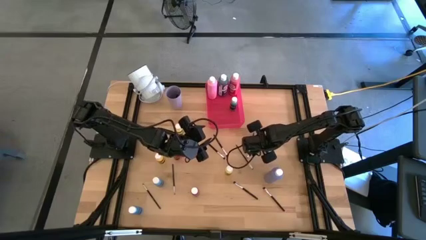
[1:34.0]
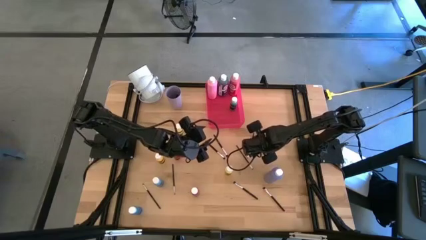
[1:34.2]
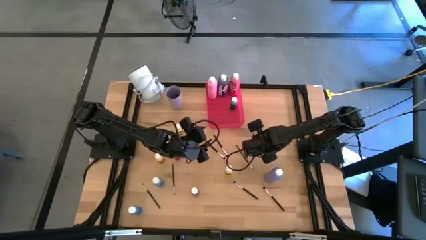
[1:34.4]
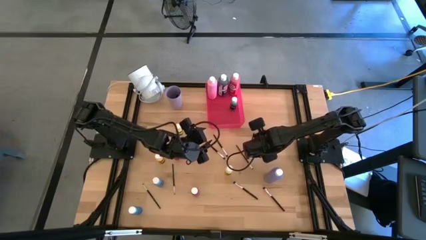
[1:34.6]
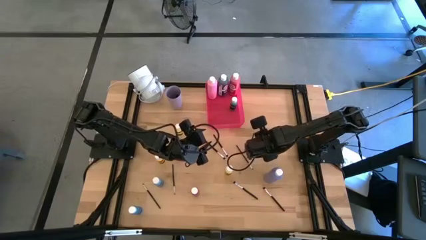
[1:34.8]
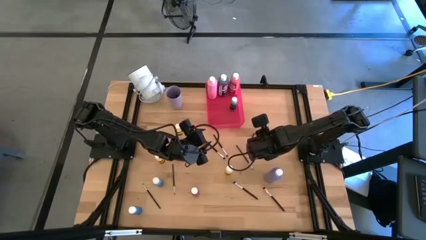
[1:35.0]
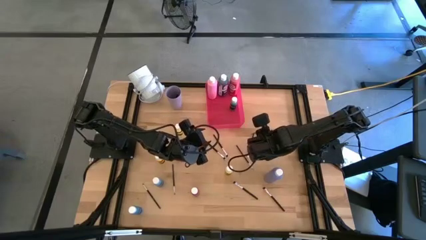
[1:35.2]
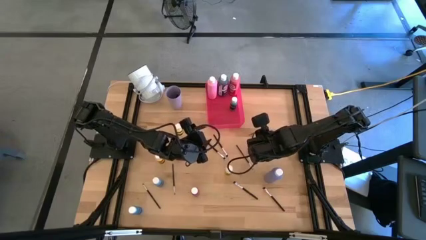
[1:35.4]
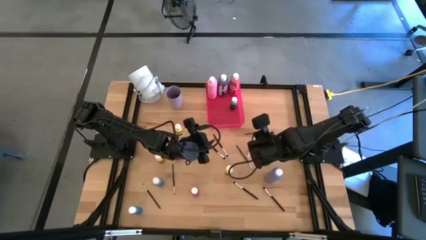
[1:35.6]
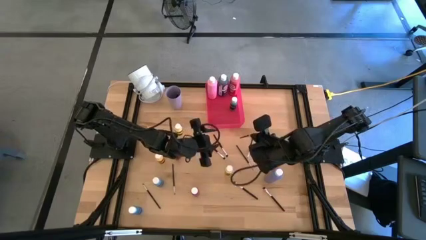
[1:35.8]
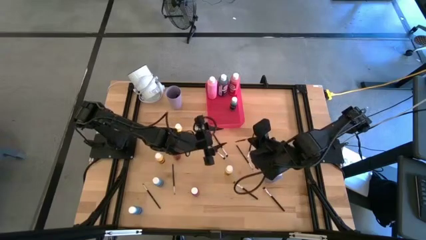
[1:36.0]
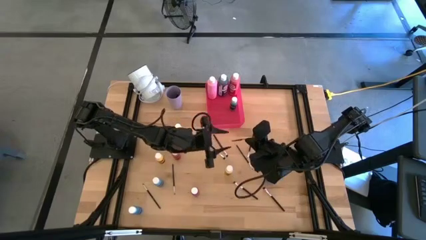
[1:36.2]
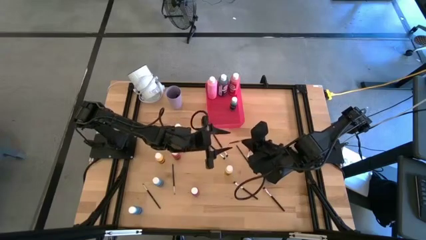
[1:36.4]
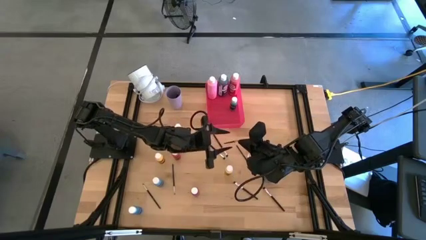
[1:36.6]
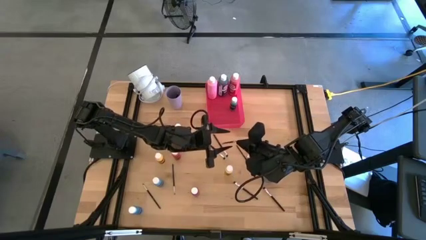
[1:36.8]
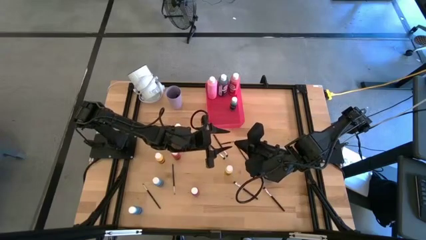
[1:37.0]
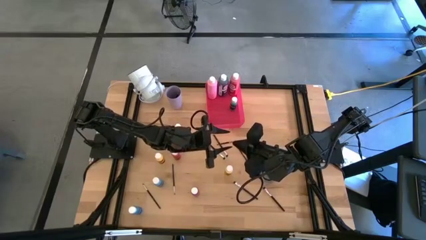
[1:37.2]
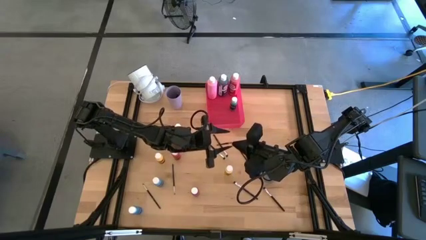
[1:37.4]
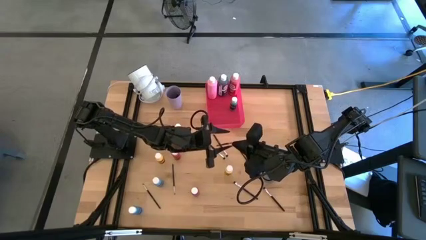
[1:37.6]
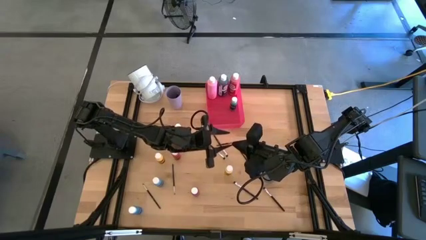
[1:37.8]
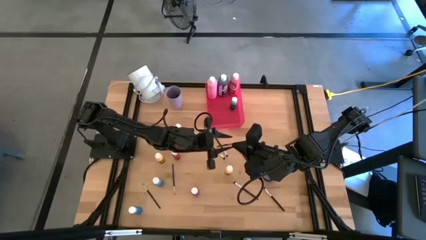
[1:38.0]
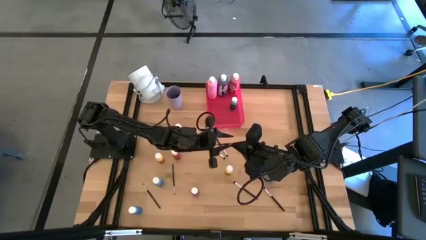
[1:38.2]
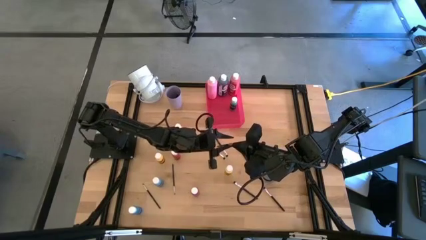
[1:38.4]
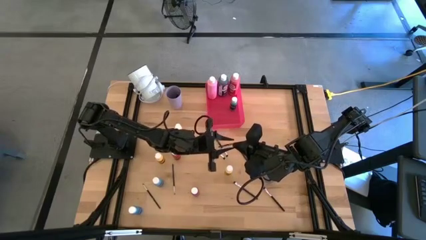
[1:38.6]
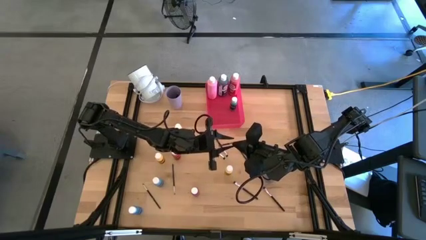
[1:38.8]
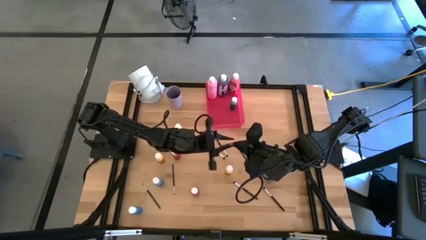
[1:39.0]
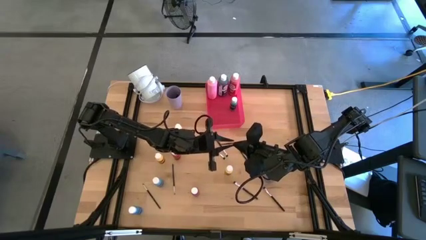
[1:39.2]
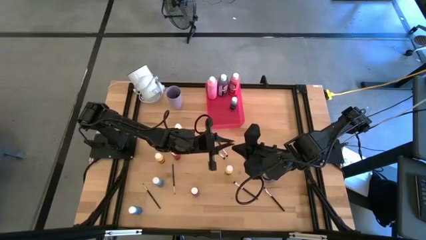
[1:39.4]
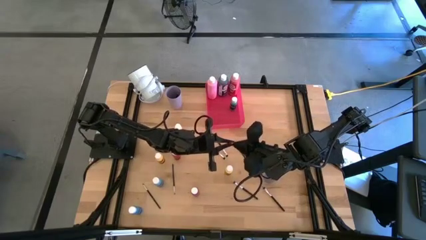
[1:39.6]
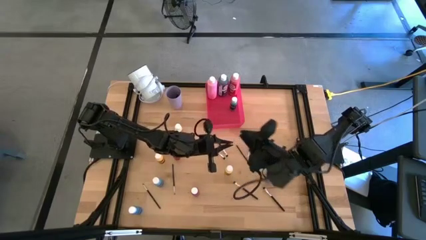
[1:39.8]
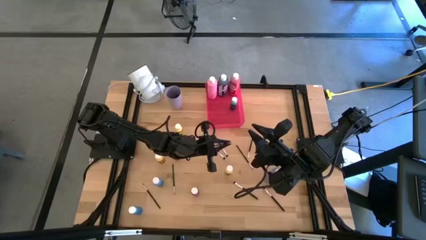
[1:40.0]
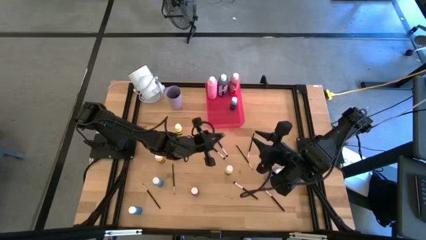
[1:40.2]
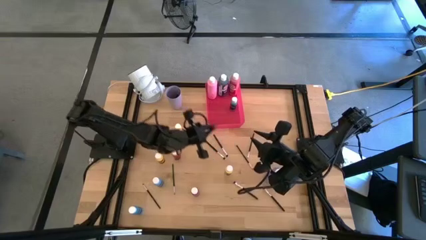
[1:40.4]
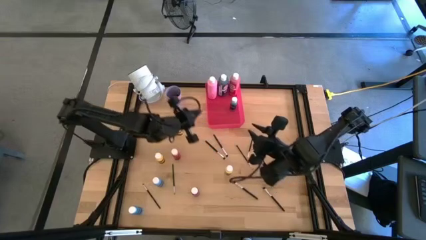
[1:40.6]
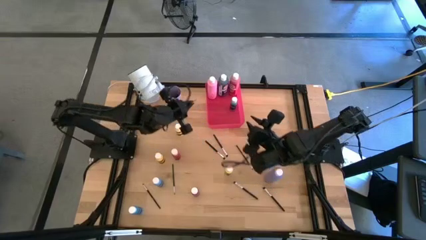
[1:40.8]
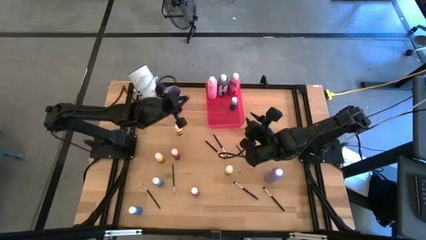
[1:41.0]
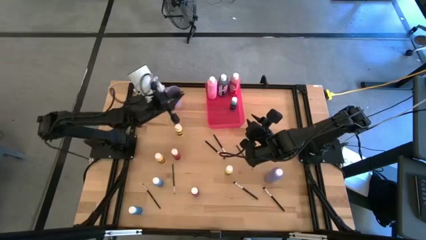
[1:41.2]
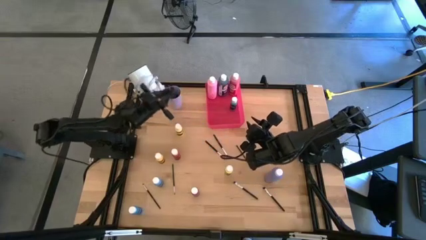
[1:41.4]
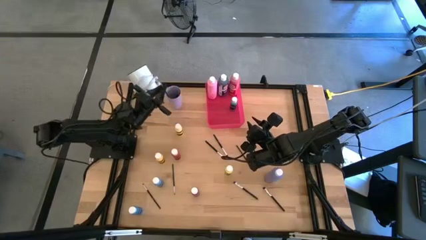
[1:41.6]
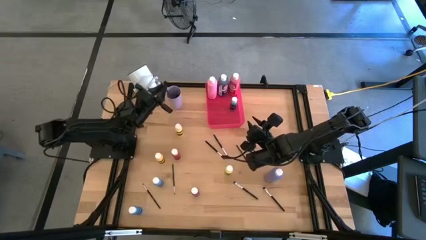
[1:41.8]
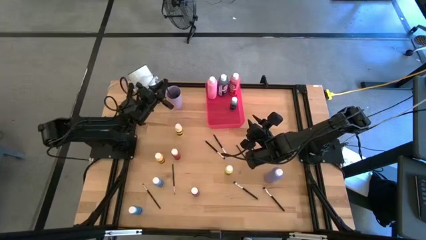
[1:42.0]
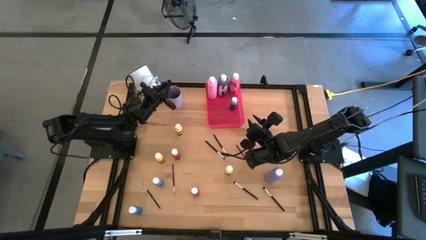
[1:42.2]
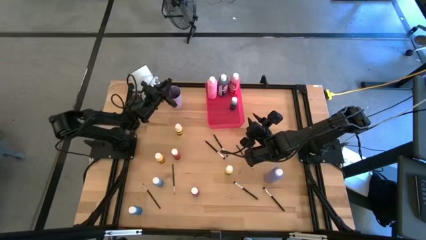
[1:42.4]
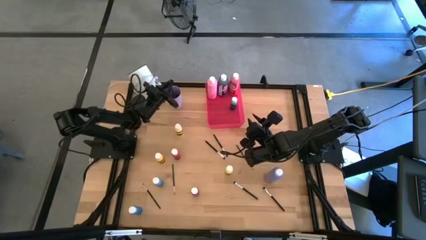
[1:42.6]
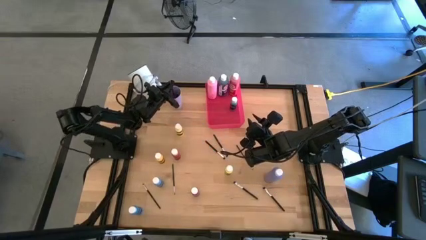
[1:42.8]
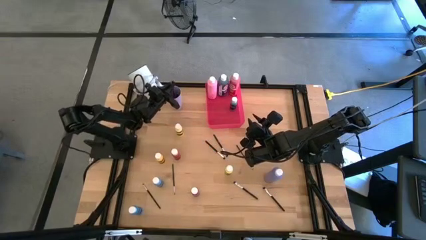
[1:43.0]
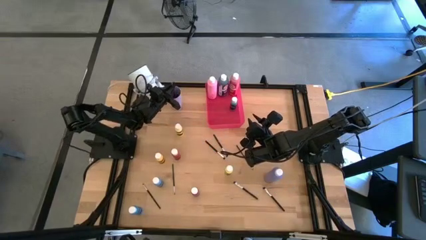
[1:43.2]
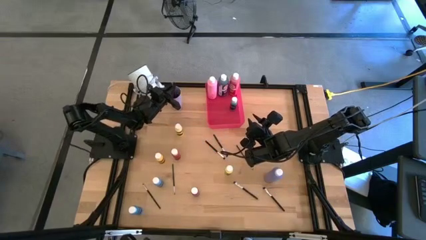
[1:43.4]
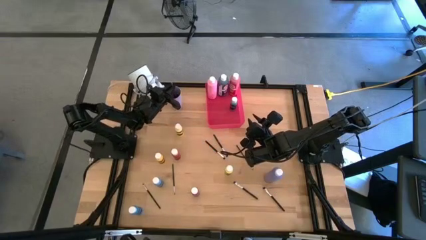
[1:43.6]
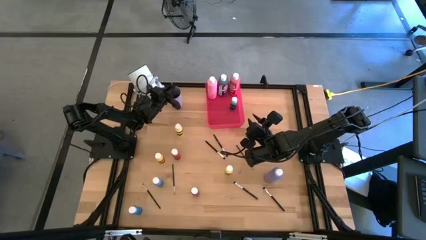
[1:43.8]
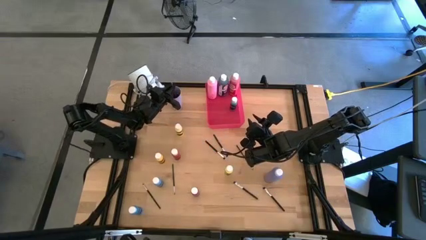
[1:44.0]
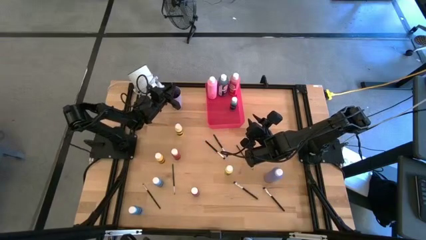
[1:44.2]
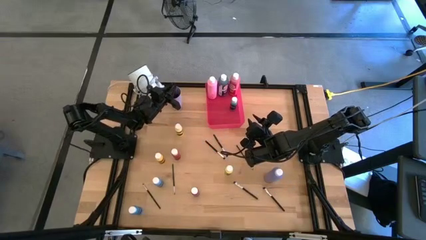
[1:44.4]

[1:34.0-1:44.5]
Task: Pick & Place Paint Supplies
Put the black paint brush into the purple cup

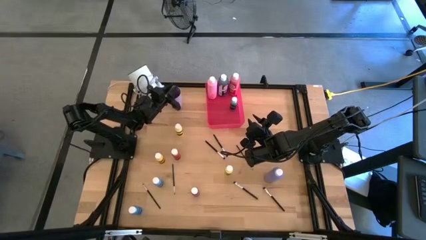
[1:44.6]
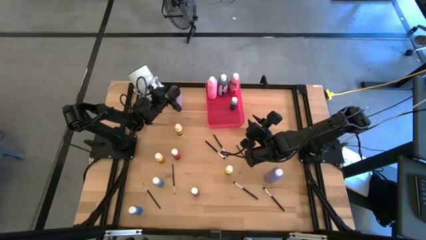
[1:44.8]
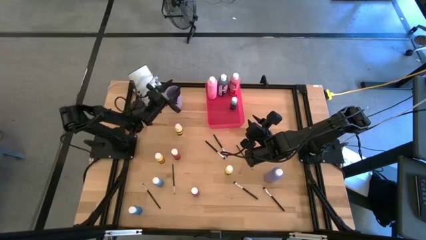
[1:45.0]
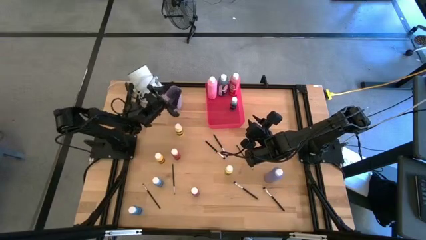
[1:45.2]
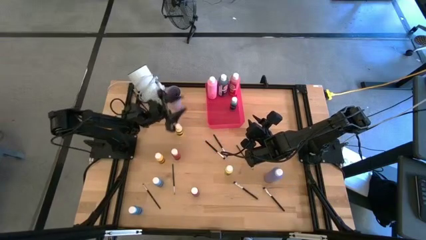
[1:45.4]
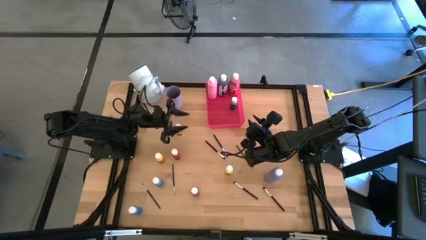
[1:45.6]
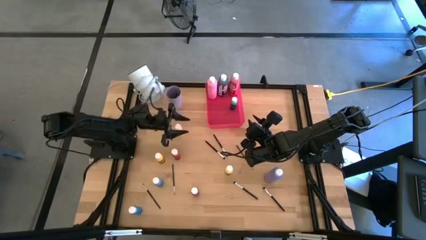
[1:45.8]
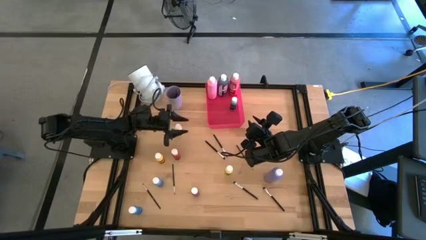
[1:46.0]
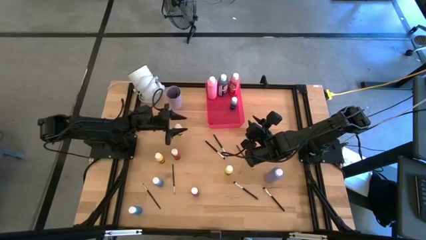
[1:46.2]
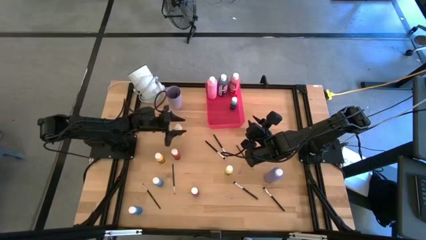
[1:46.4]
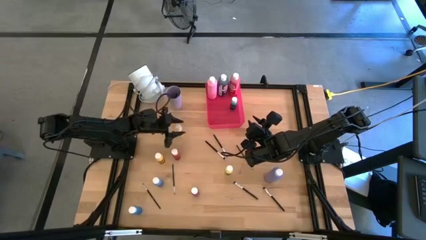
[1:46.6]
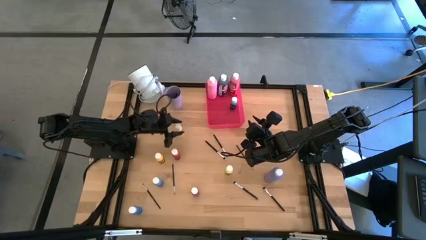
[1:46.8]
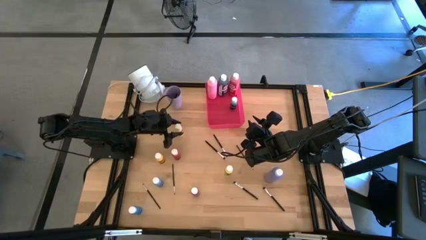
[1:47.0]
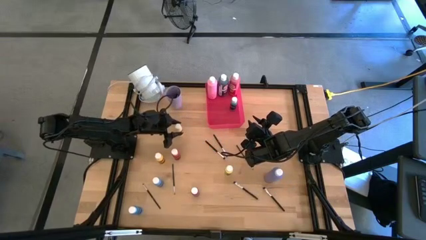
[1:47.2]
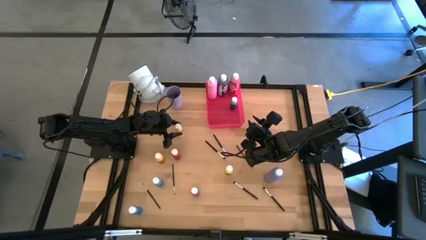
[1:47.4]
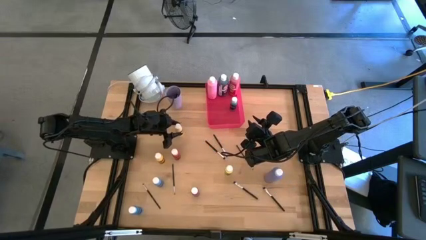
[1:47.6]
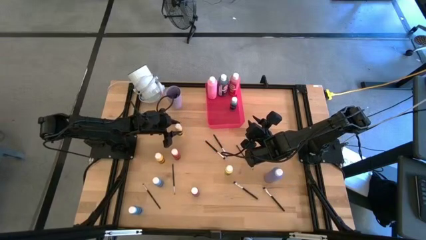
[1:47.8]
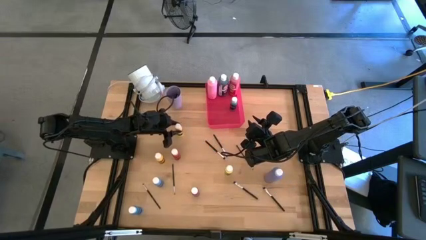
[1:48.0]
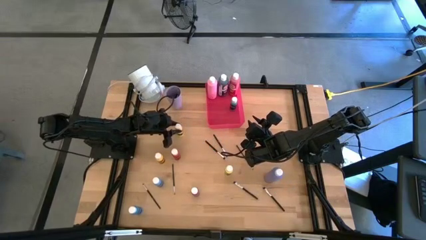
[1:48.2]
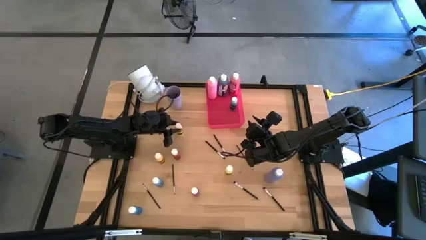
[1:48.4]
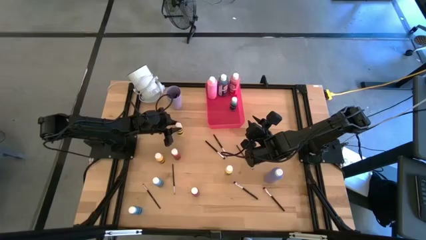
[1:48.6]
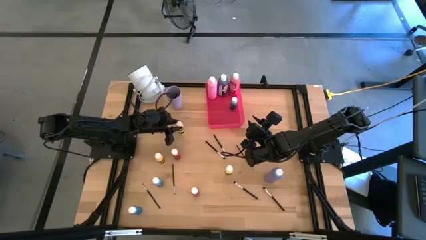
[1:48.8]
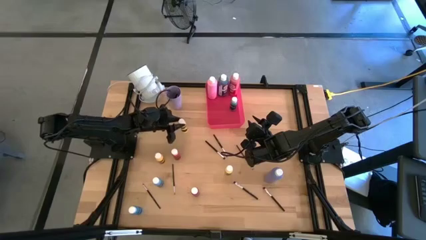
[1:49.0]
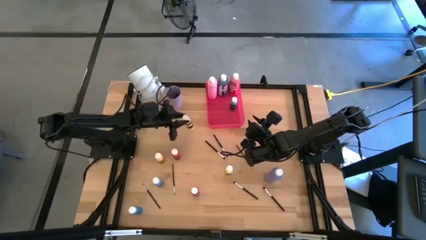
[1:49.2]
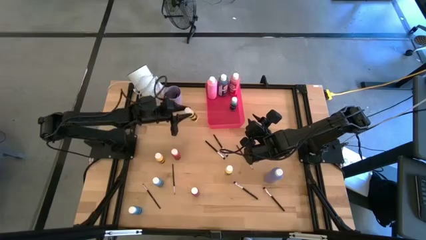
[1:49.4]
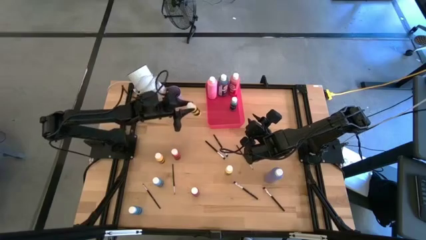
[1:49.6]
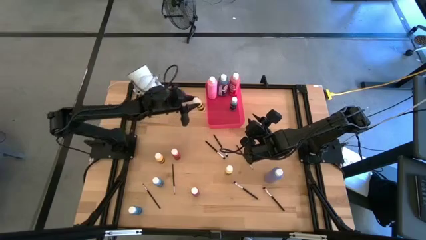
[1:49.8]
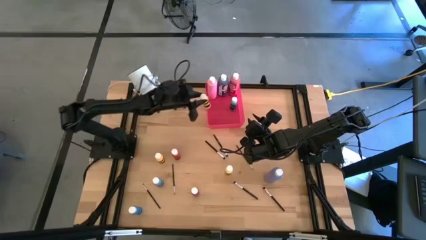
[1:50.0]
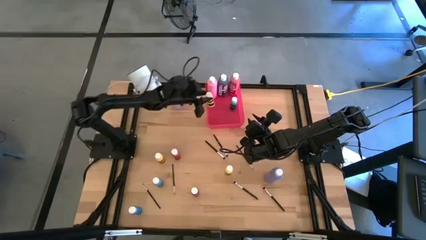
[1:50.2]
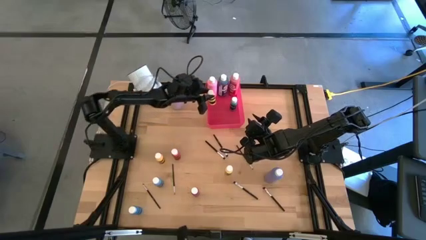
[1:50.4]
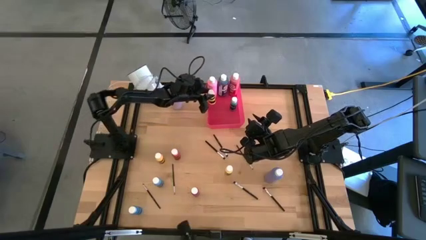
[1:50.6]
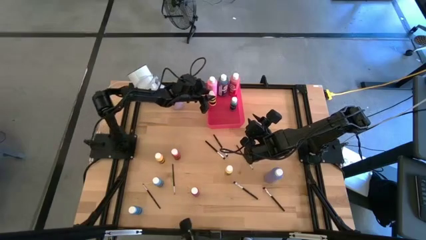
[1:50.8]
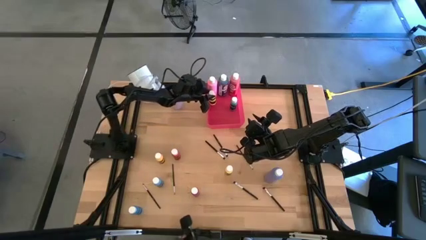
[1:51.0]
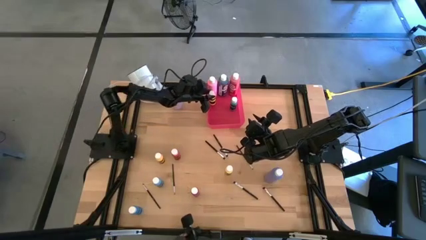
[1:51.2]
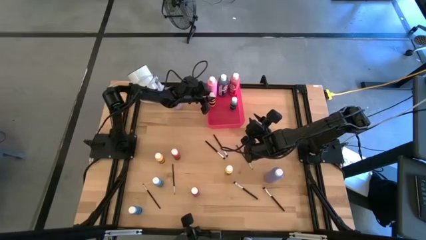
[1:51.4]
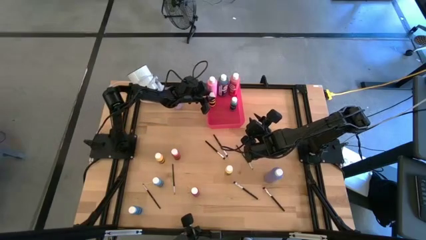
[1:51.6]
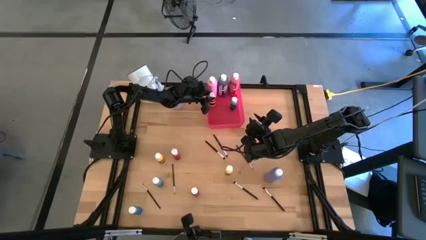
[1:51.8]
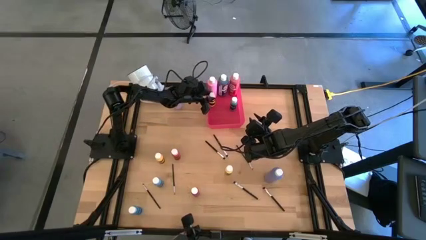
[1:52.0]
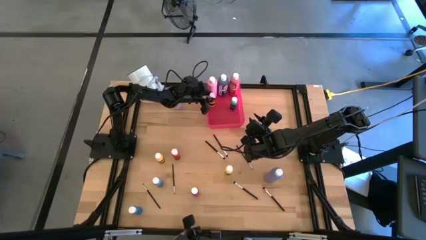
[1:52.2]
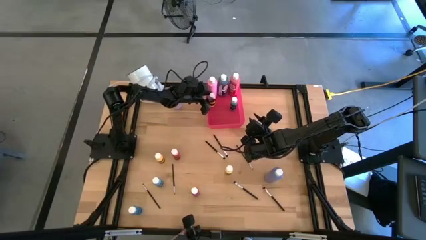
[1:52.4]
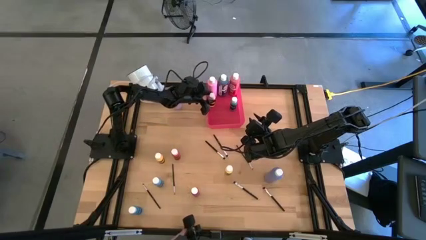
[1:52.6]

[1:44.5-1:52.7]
Put the top left yellow paint bottle into the red bin
